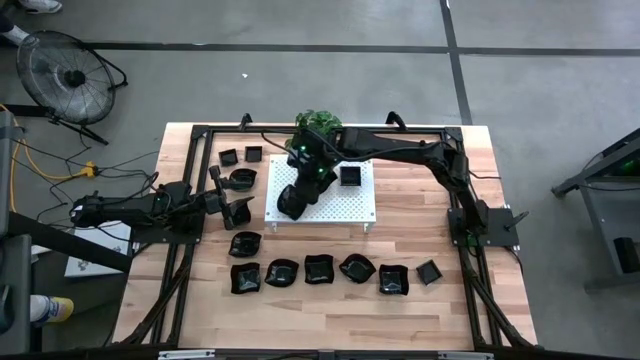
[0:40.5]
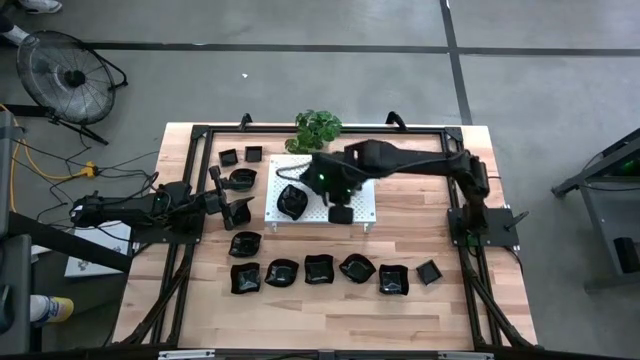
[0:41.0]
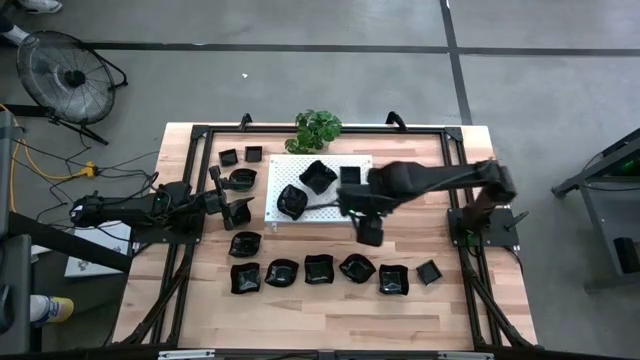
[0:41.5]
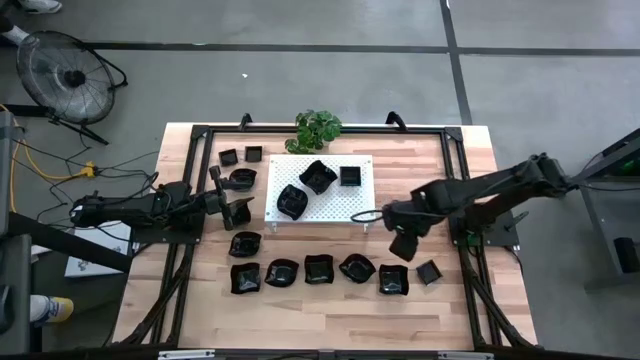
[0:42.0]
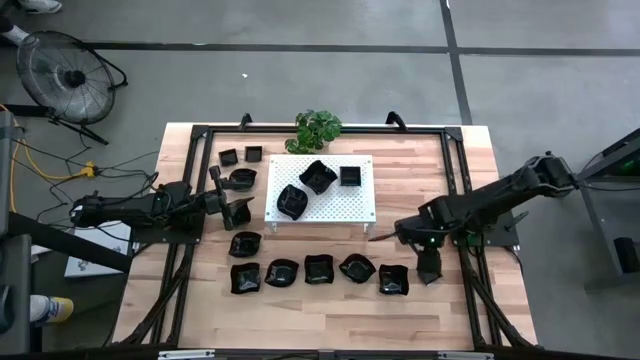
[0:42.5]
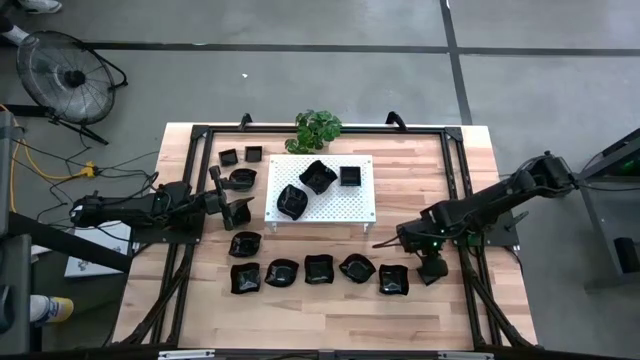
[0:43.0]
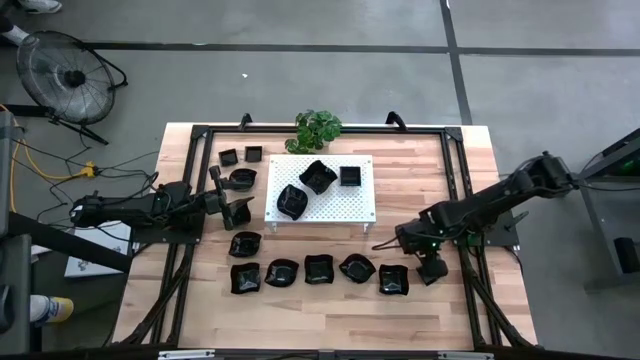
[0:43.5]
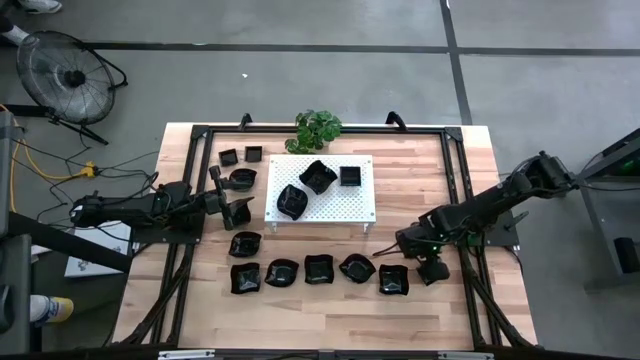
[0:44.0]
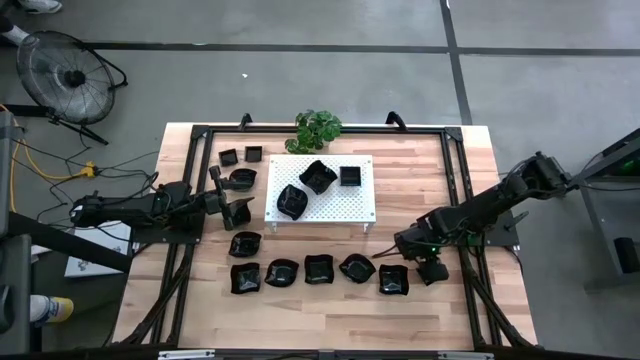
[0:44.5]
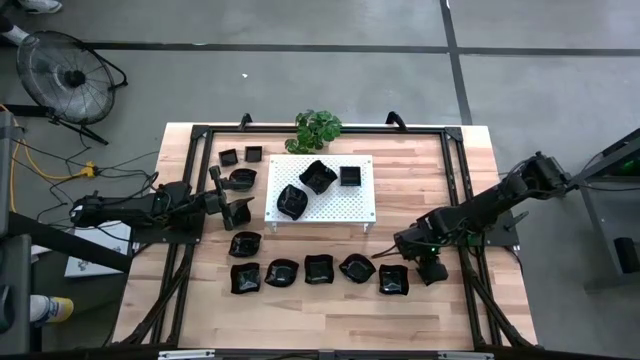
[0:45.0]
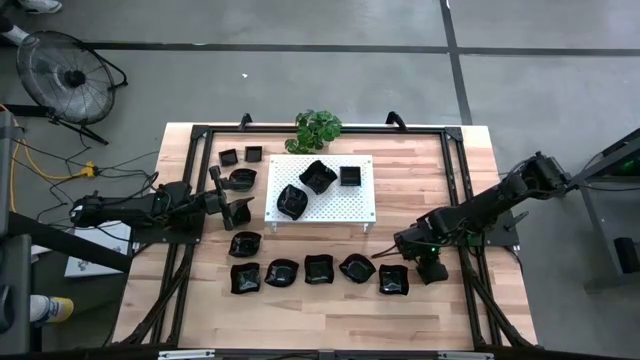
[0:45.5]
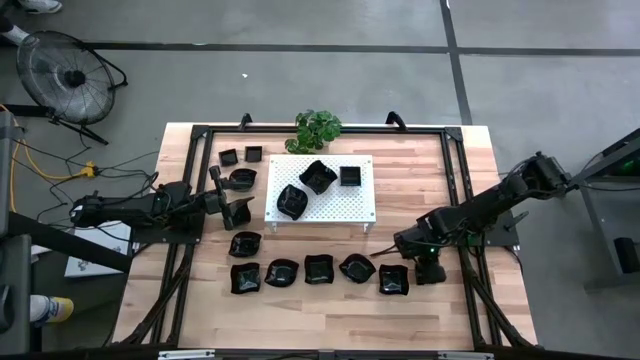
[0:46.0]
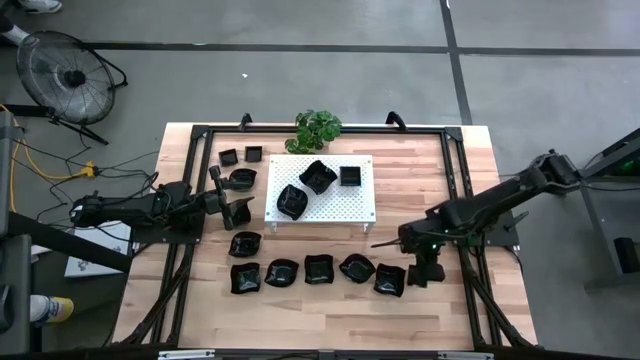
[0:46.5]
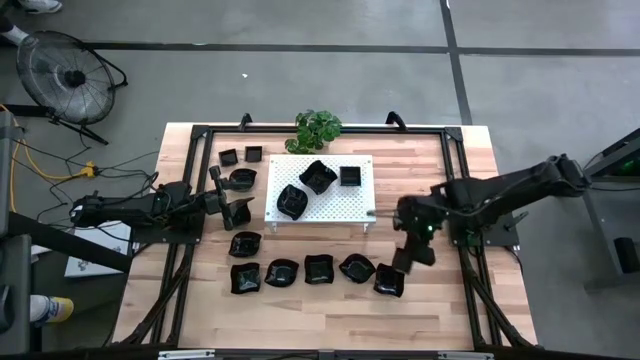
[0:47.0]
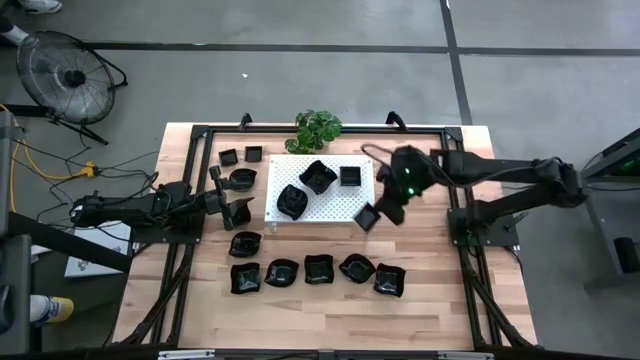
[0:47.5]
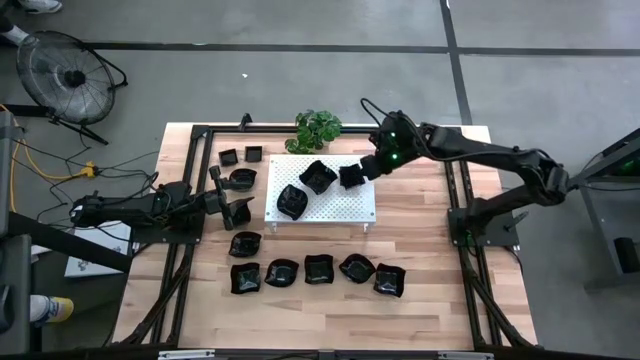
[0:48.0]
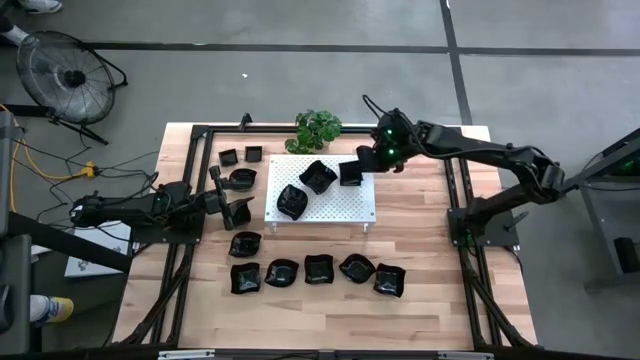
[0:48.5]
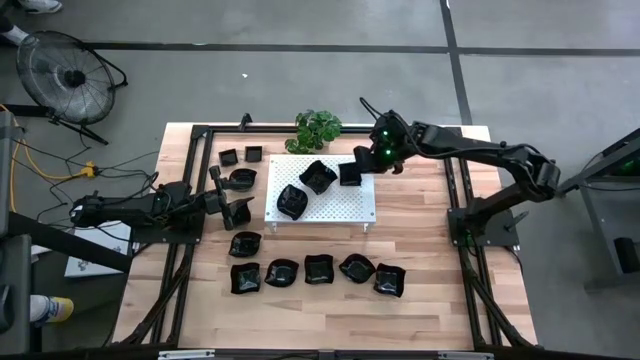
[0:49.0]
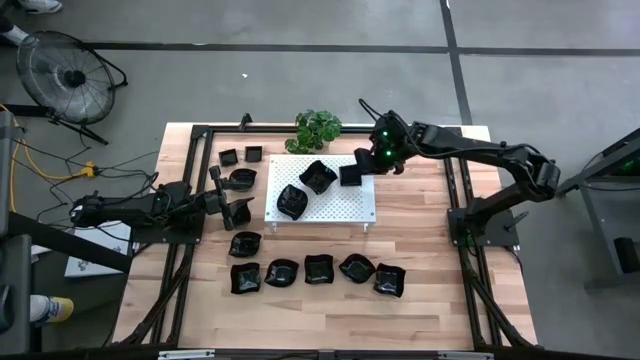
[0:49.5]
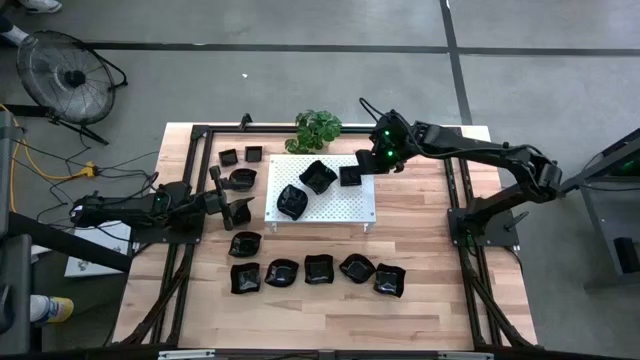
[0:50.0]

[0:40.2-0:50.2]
Task: Pick & Place Mini shaped plates
Stack the square plate on top of the square plates on the shelf

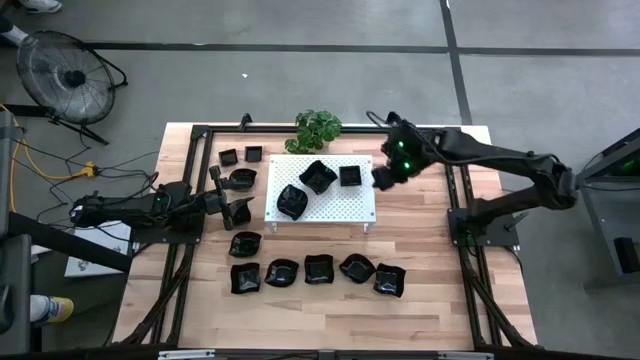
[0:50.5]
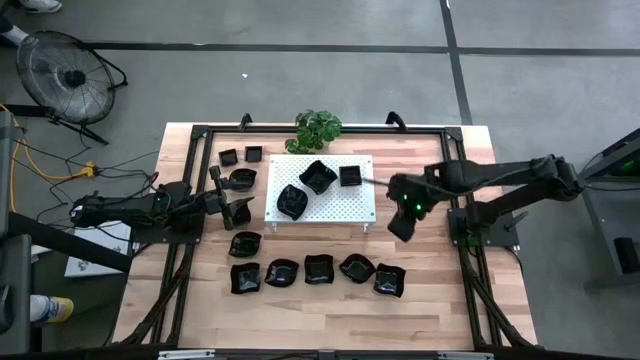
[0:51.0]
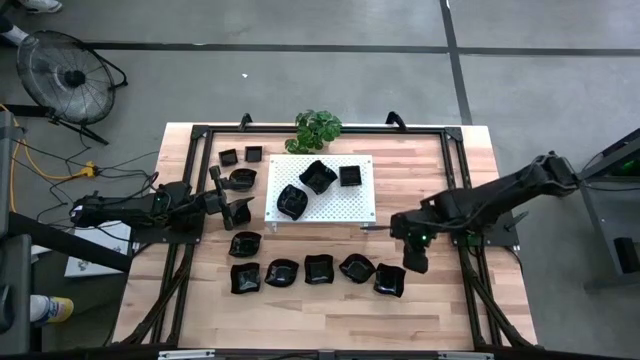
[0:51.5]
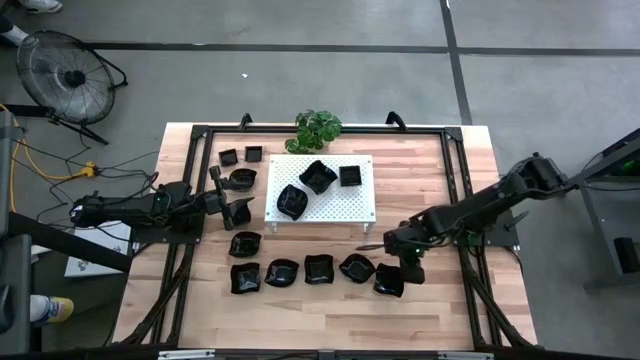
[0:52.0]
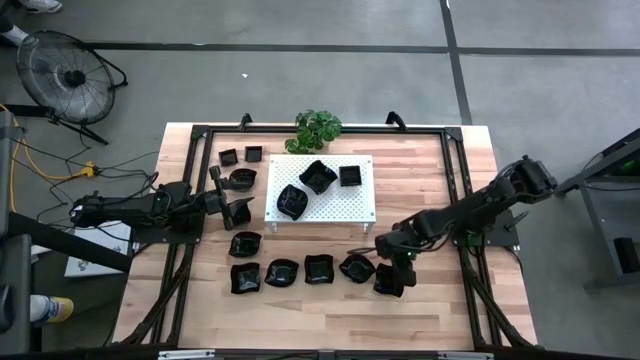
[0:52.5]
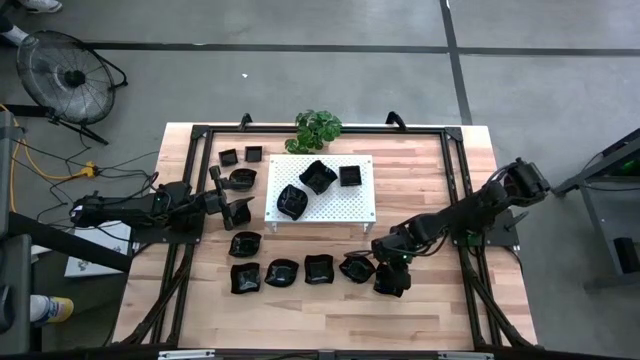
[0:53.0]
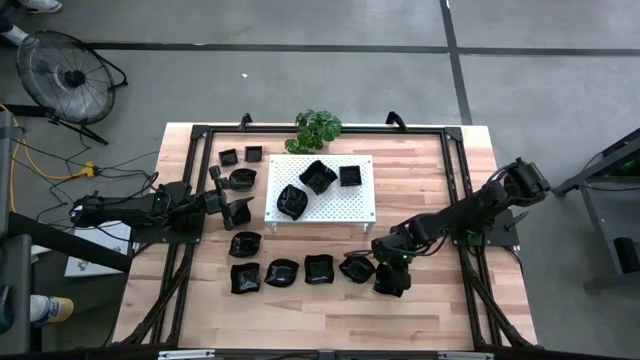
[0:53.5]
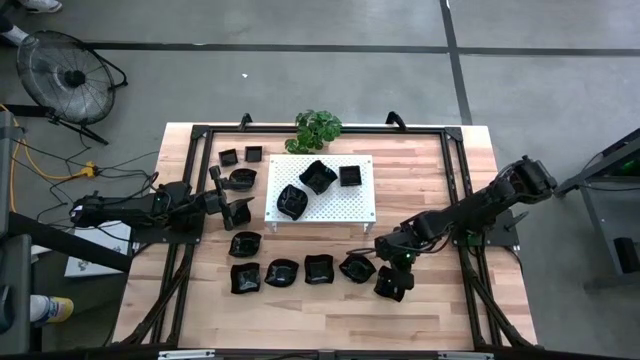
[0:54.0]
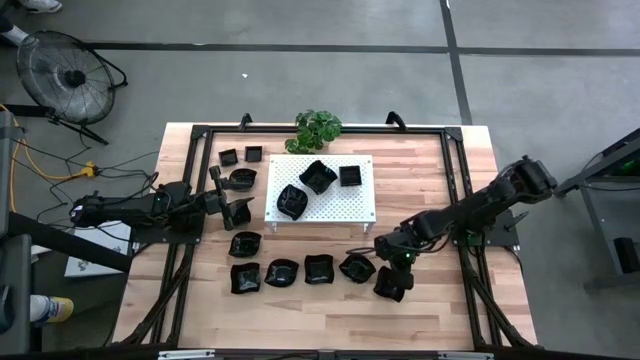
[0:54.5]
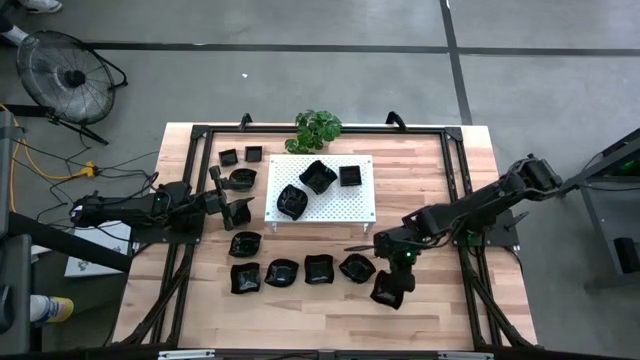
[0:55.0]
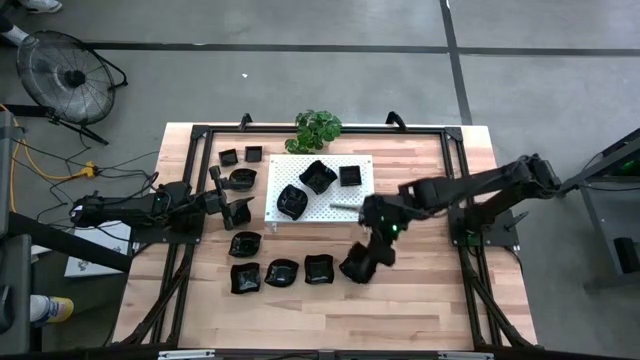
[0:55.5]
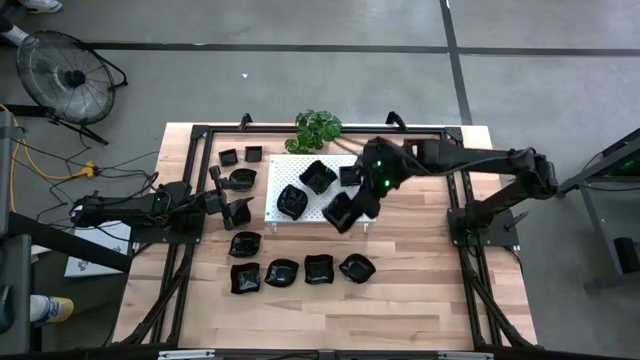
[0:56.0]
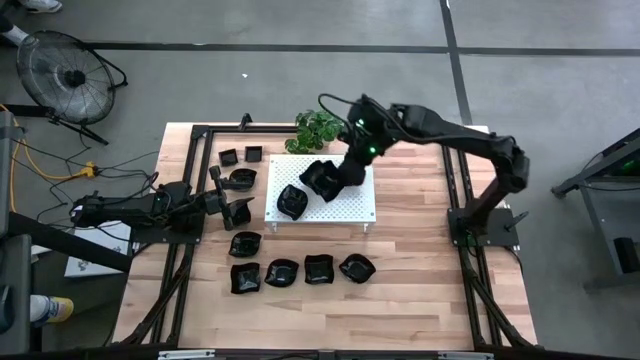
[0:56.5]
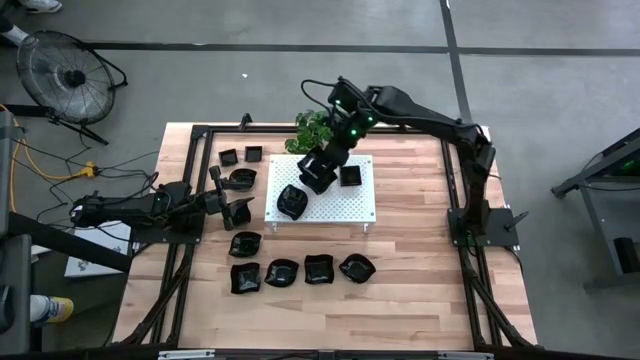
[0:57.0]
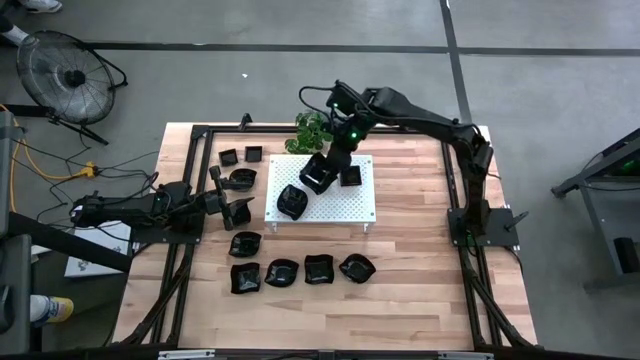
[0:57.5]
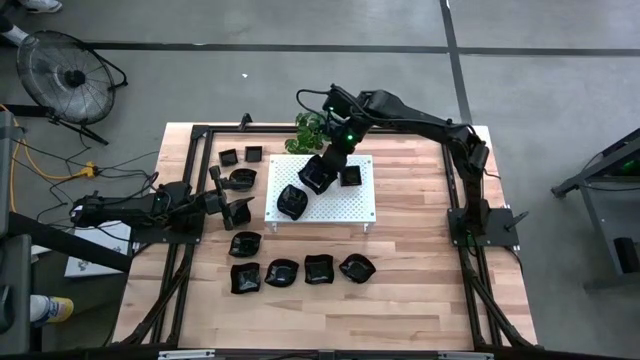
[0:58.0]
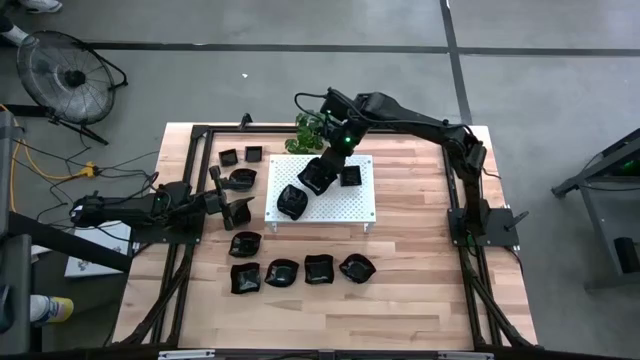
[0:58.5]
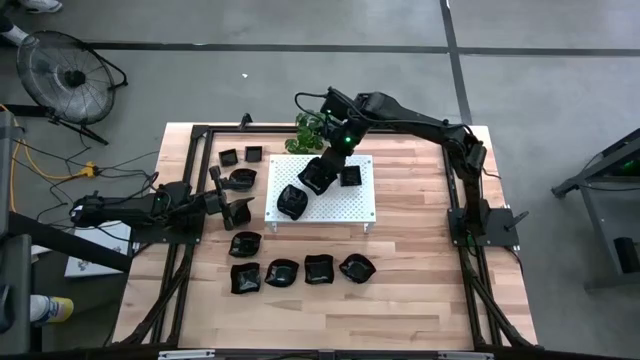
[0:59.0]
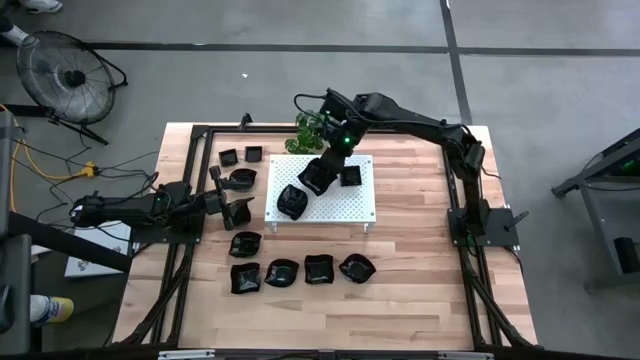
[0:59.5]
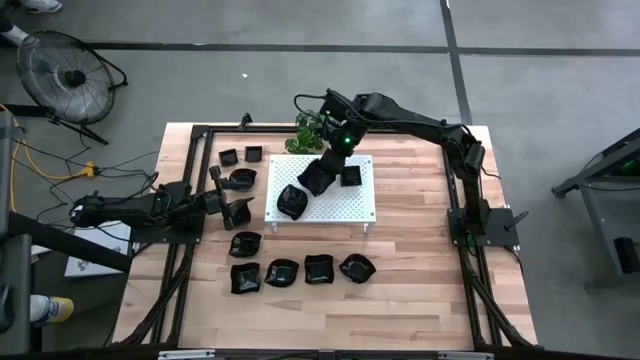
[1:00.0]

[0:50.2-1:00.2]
Stack the distorted square plate on top of the distorted square plate on the shelf

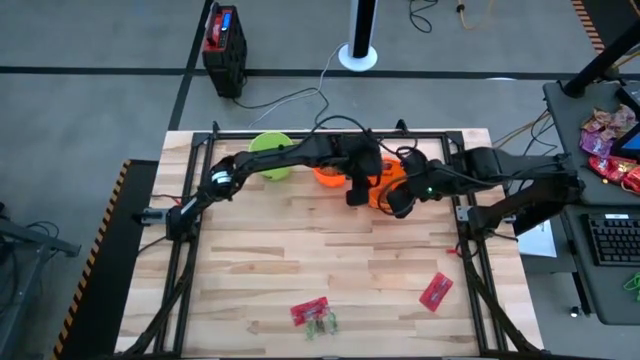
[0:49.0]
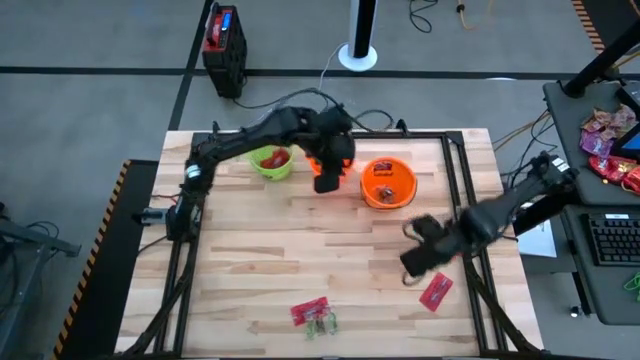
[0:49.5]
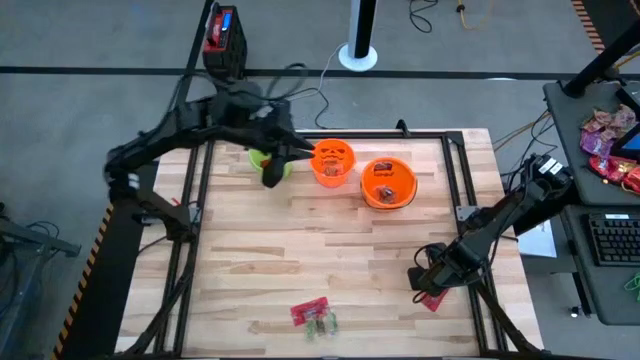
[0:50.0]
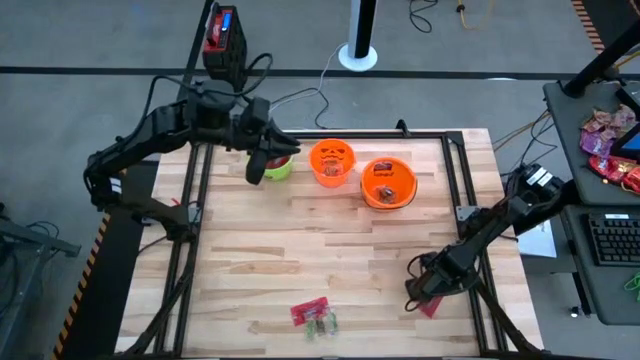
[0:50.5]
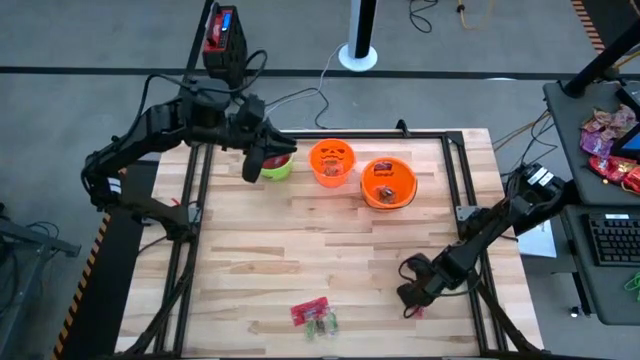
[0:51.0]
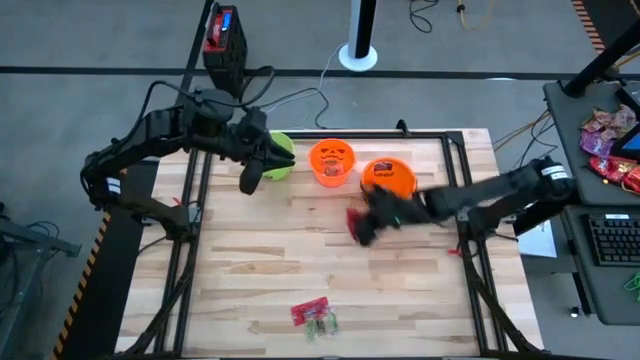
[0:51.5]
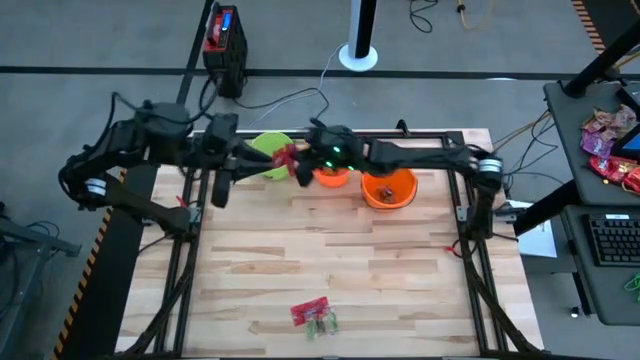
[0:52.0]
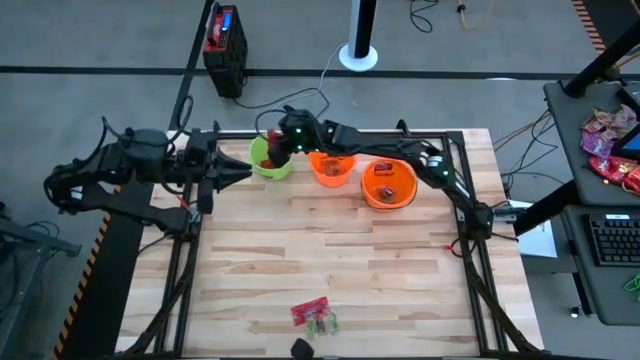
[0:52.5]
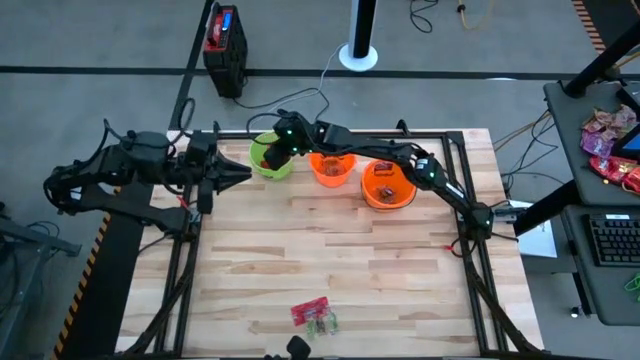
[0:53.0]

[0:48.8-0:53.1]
Task: Sort candy by brand, put in halloween buckets
Put the red candy into the green bucket
